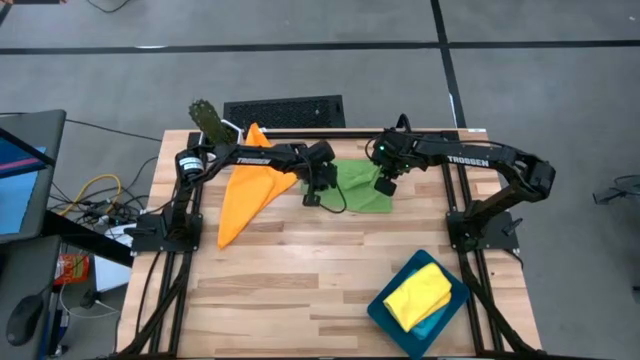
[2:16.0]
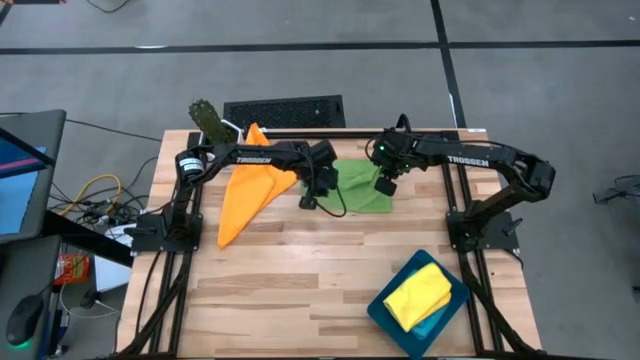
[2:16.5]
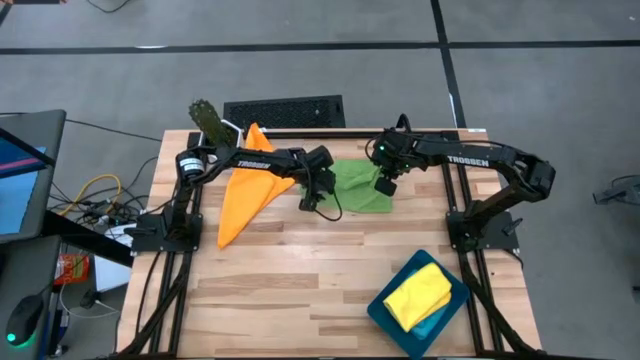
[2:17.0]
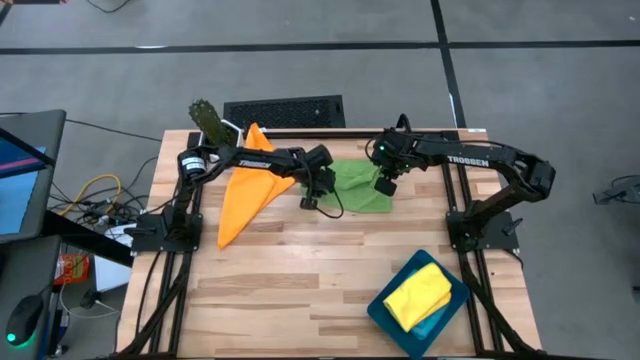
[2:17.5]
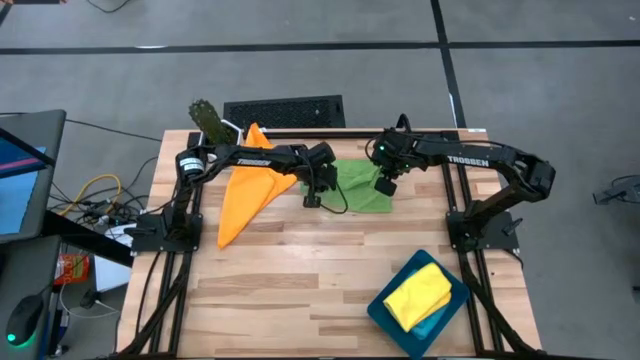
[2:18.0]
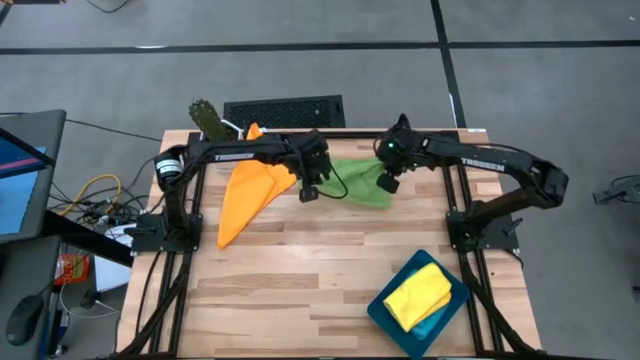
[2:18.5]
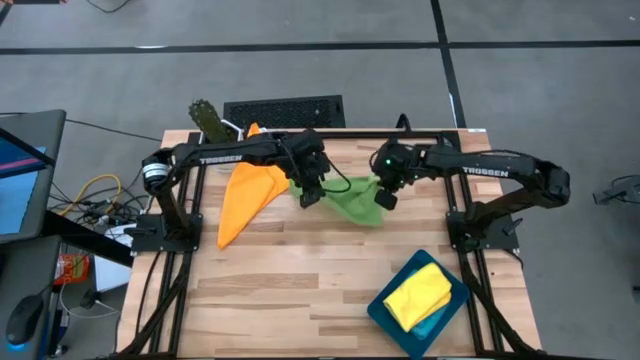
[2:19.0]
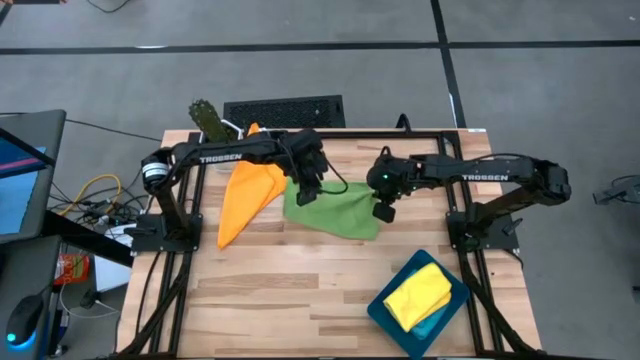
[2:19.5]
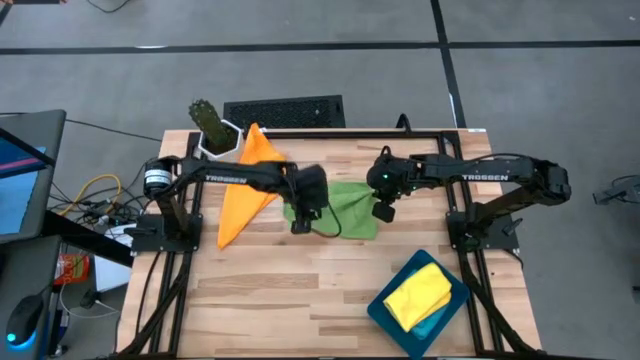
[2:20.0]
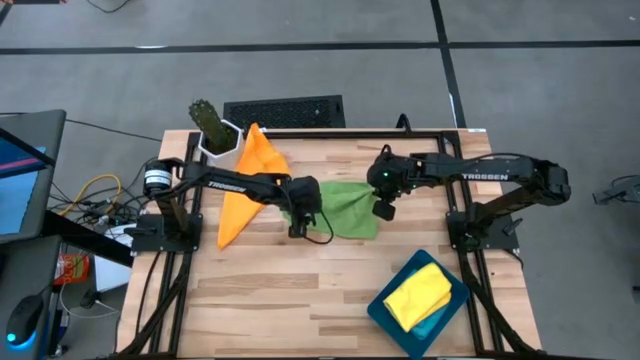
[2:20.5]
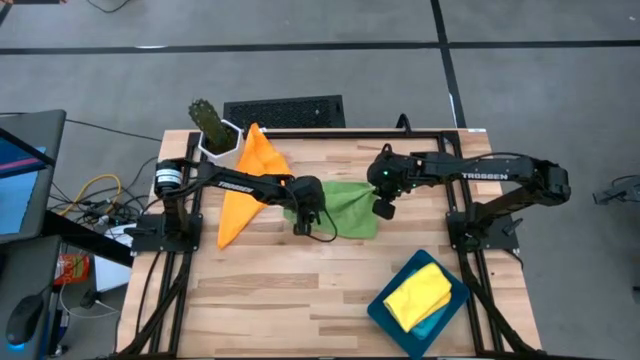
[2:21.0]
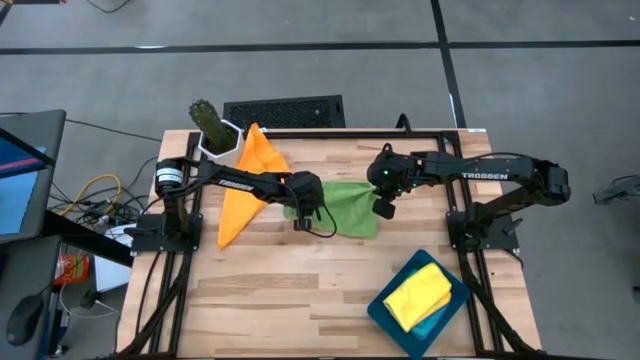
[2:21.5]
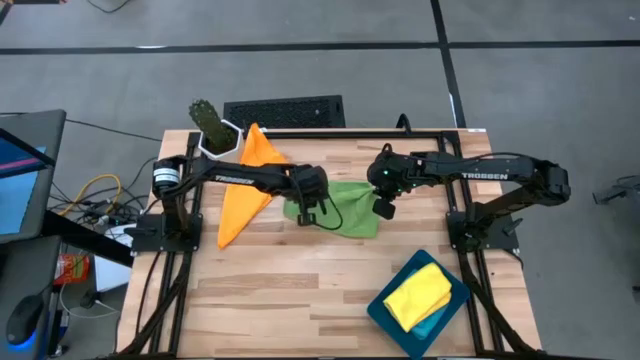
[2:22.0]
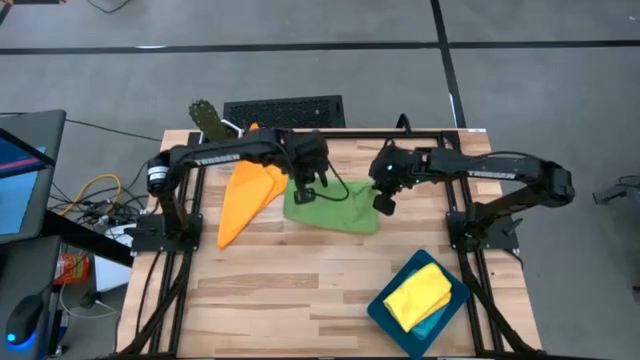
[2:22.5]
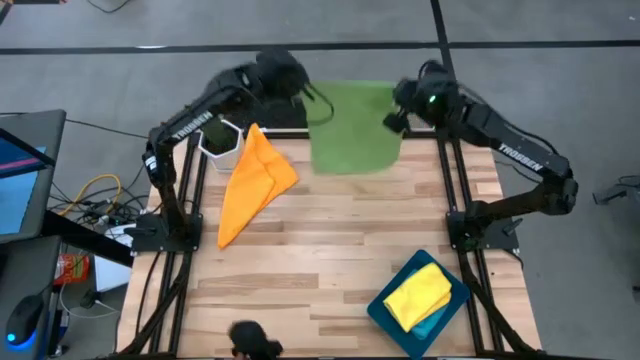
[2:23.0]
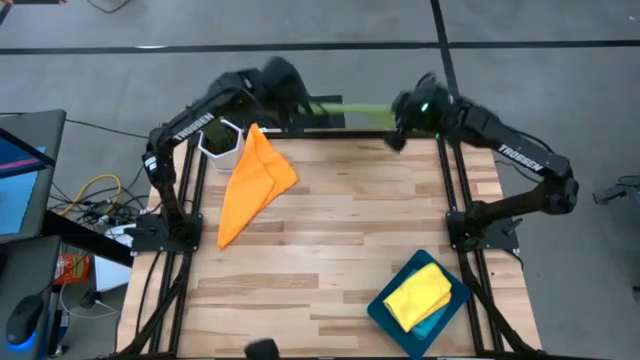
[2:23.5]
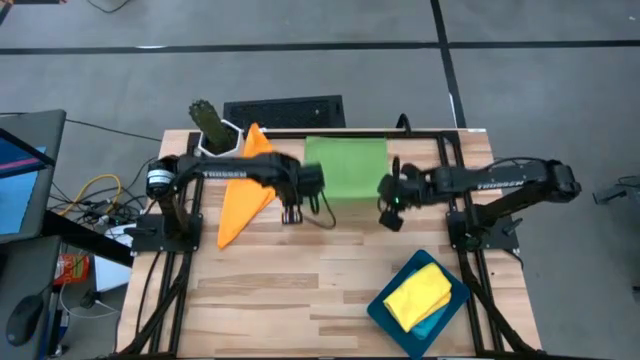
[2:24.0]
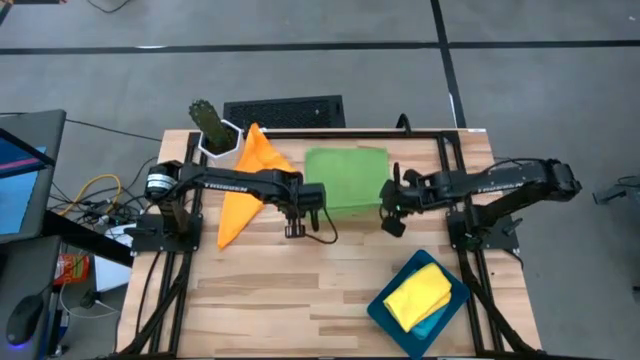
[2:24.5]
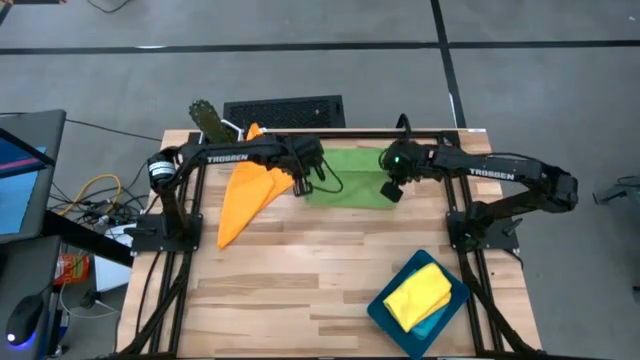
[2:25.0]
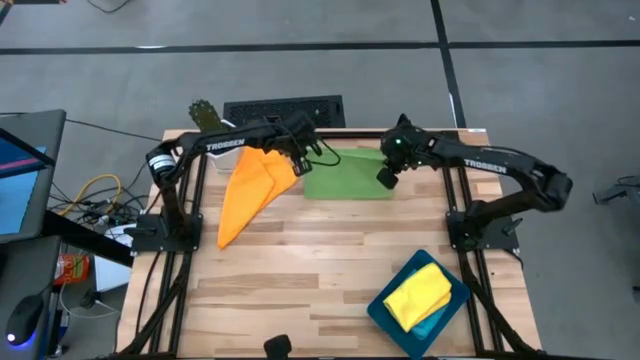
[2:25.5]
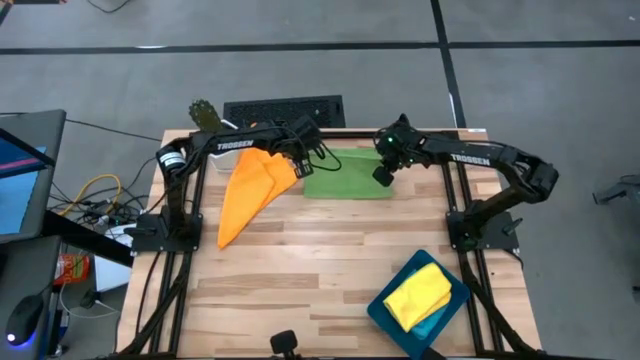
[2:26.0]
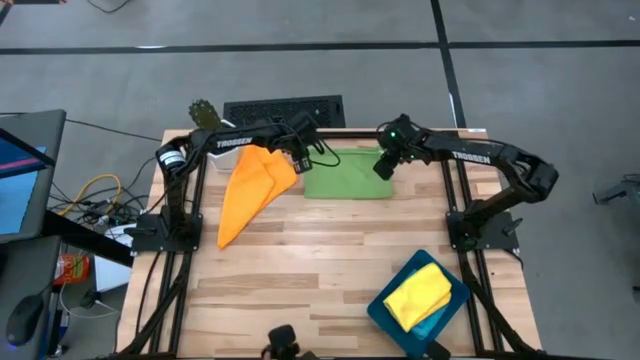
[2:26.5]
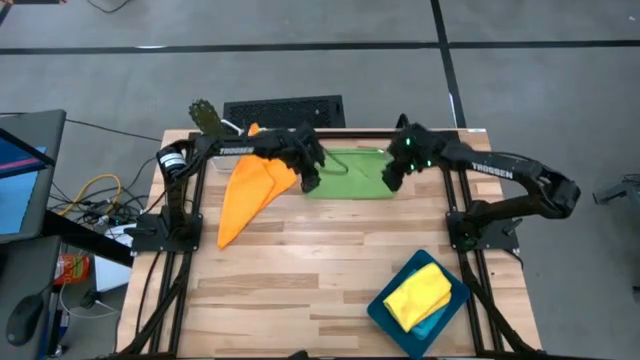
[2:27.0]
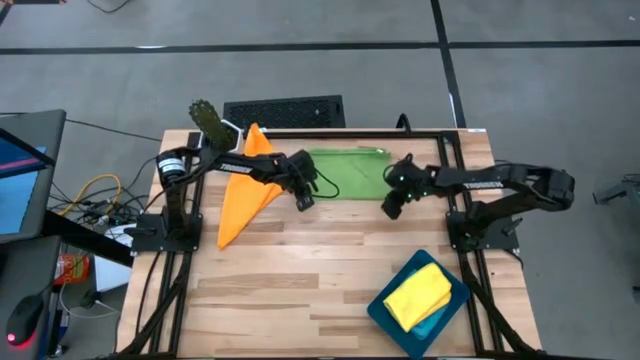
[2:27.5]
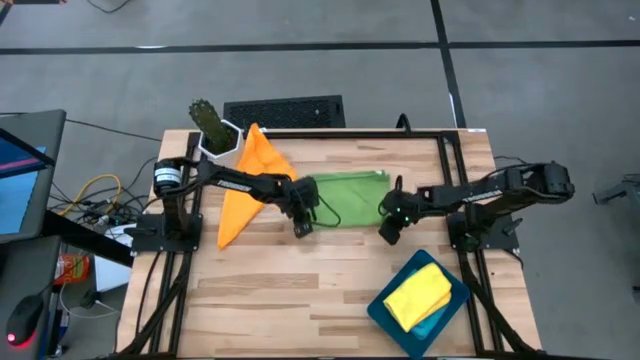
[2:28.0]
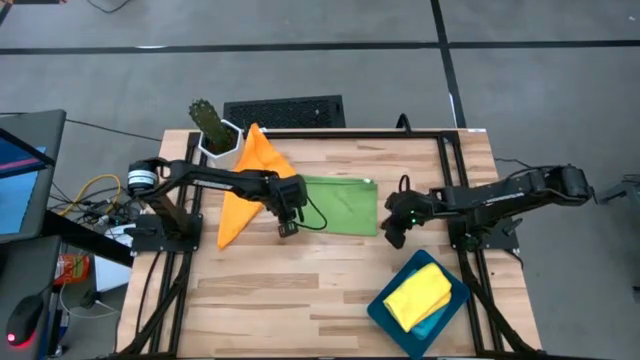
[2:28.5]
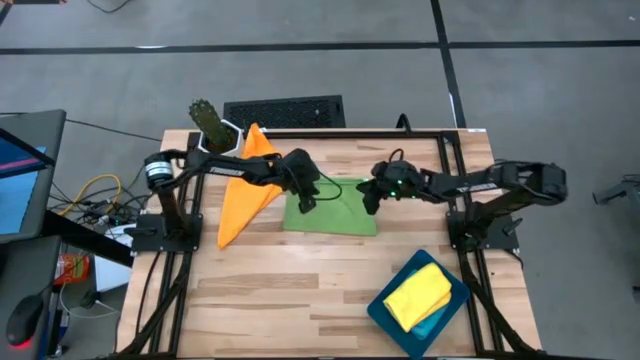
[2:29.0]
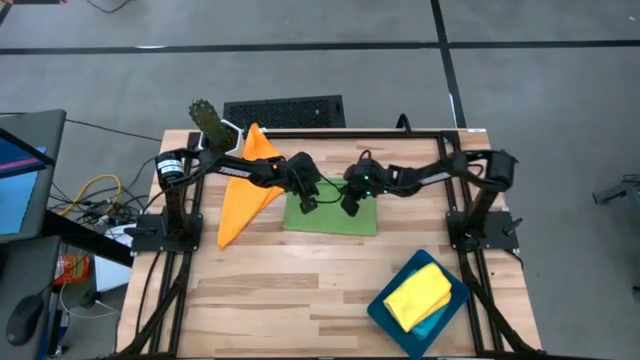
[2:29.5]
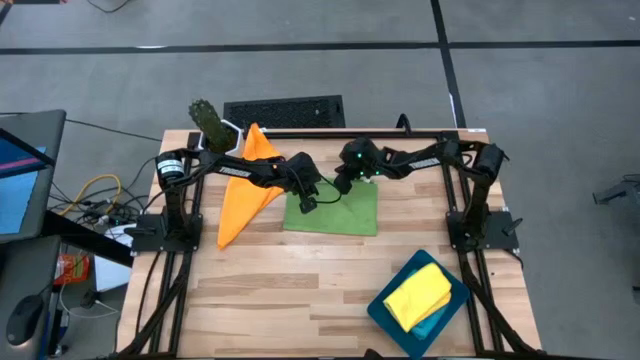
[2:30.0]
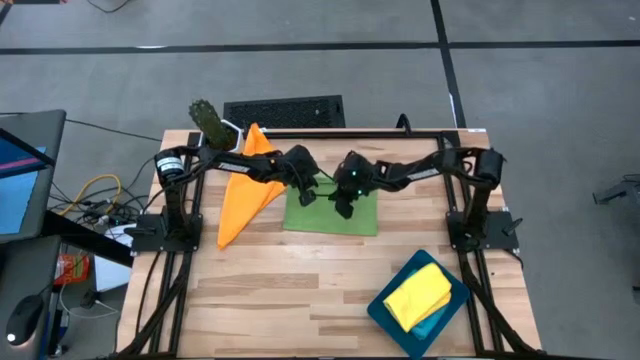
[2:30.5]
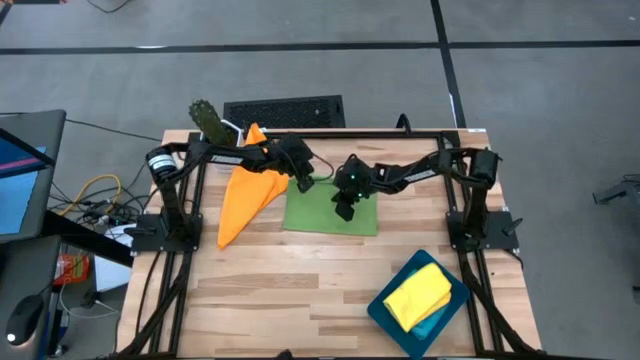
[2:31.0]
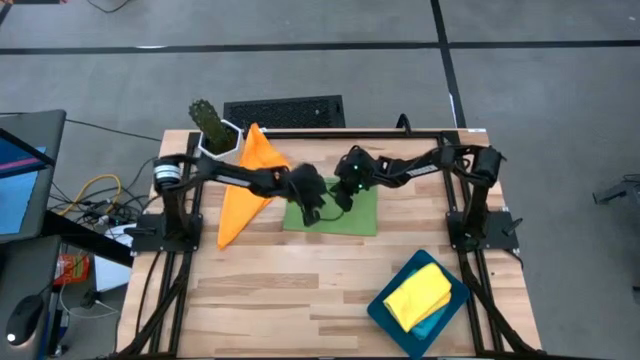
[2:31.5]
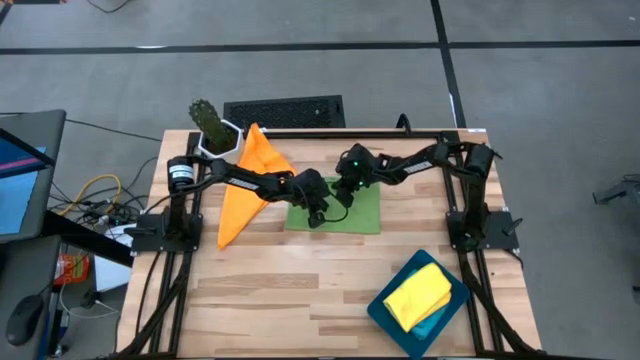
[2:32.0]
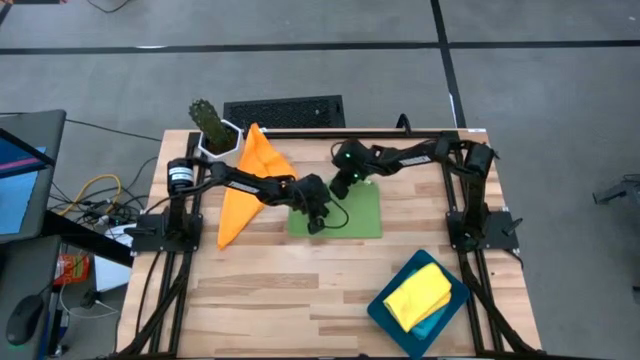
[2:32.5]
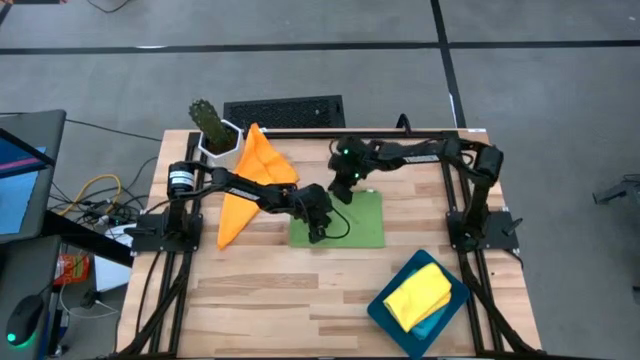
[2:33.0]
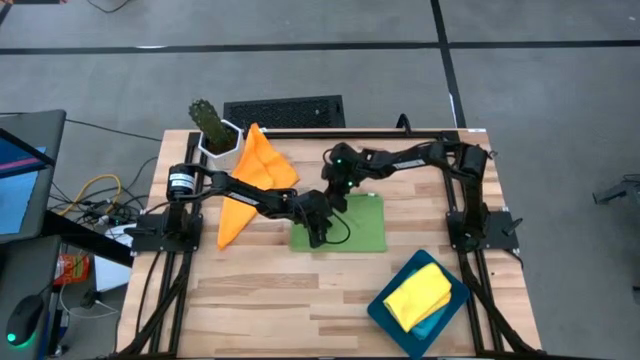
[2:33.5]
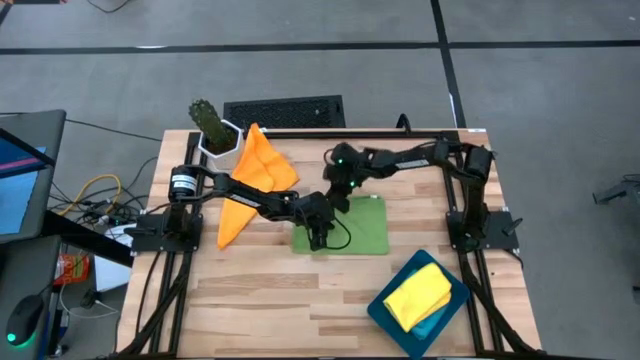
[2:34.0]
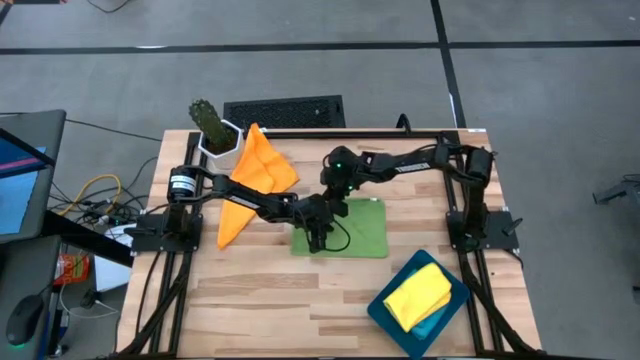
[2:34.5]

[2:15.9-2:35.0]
Task: Fold microfiber towels
Fold the green microfiber towel

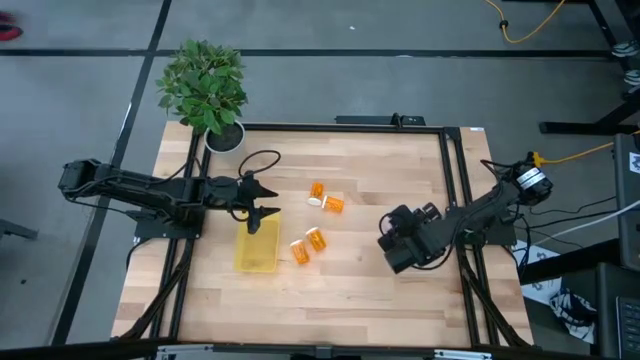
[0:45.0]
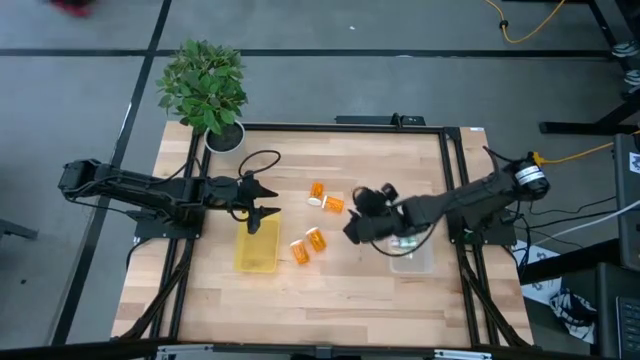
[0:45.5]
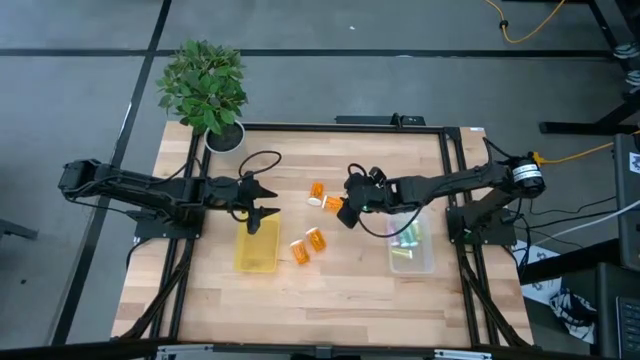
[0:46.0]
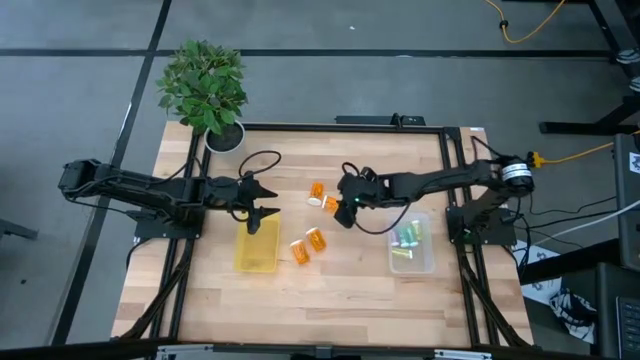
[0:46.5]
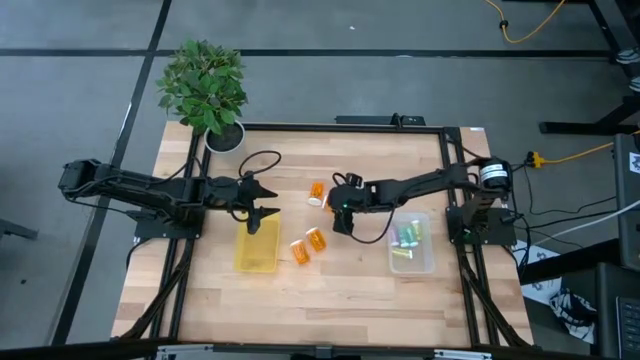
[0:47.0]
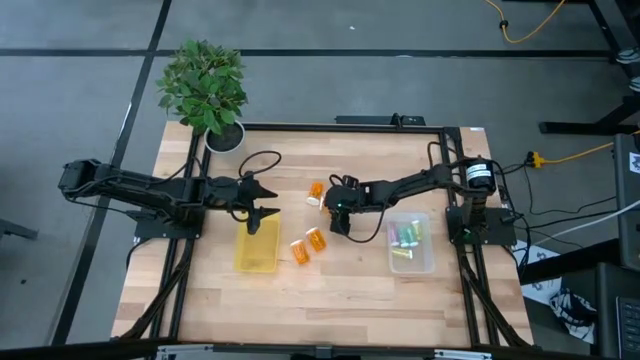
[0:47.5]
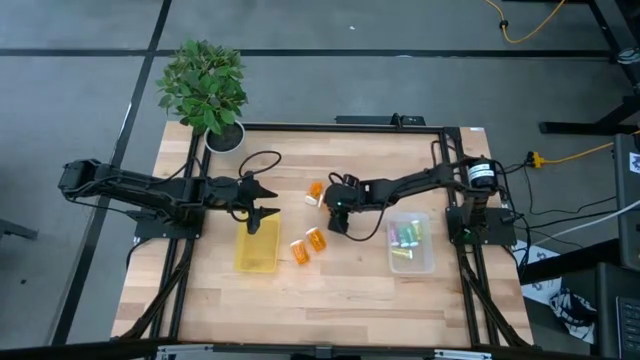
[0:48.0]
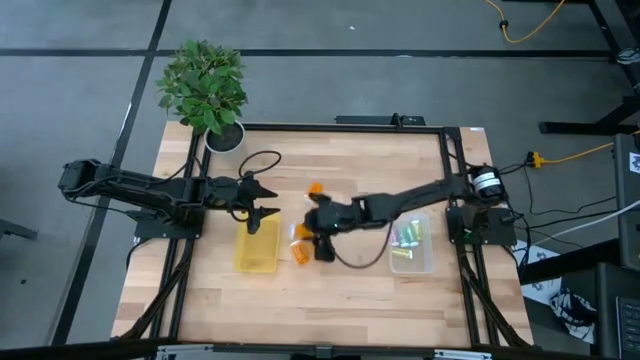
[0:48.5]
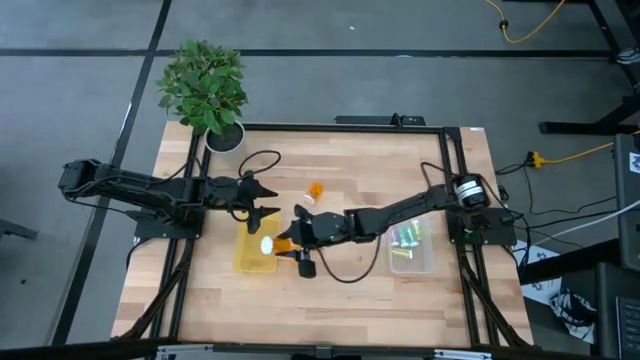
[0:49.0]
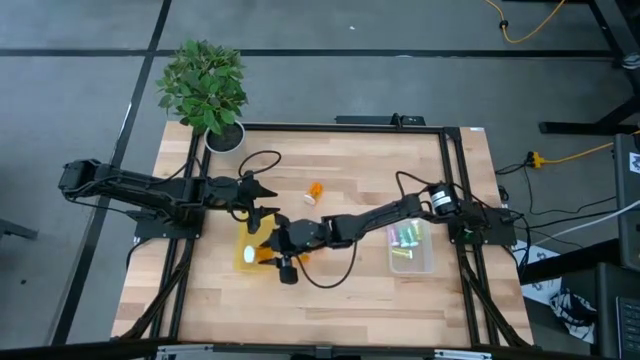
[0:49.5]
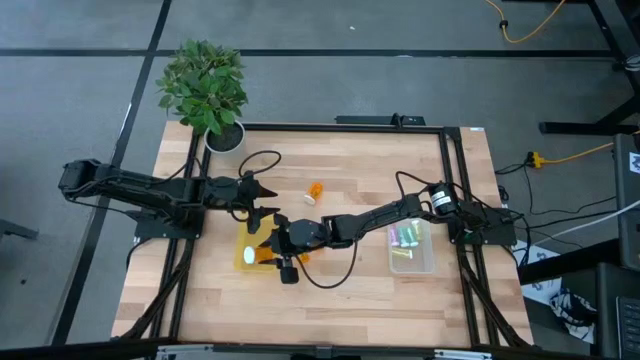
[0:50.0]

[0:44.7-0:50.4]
Task: Pick and place medicine bottles into bin by pill shape (circle, oval)
Put the orange pill bottle into the yellow bin
